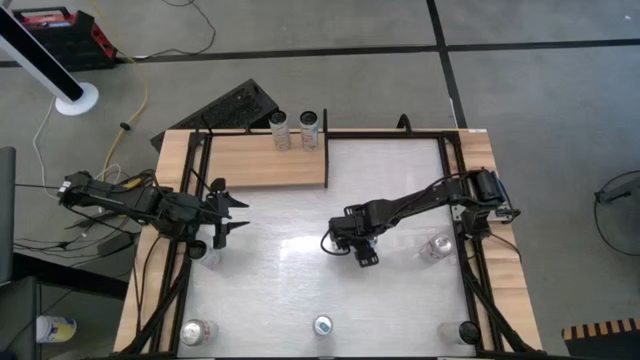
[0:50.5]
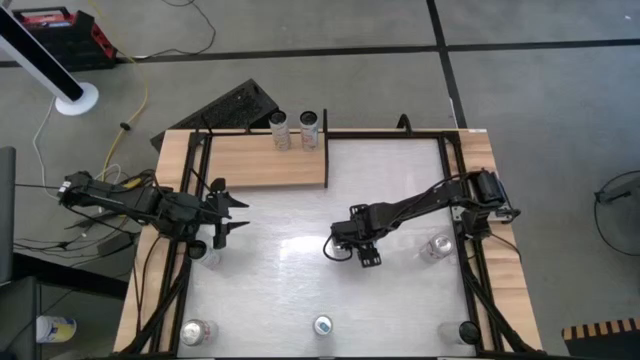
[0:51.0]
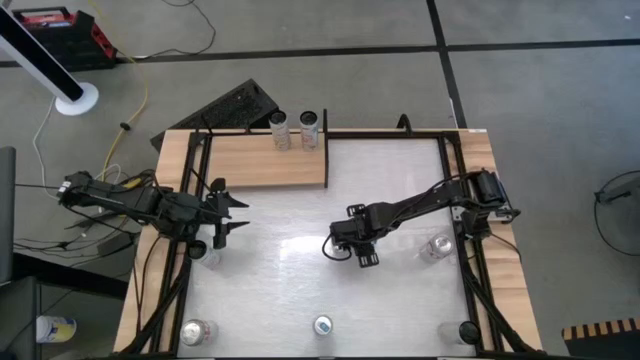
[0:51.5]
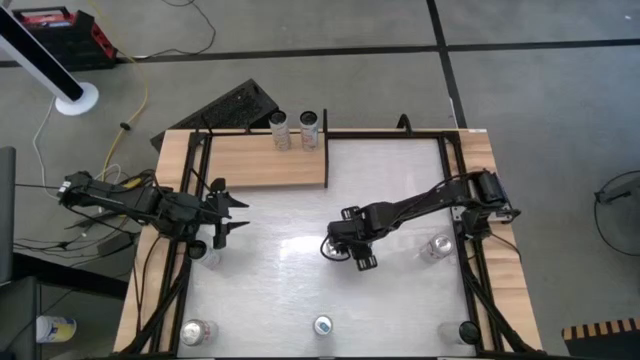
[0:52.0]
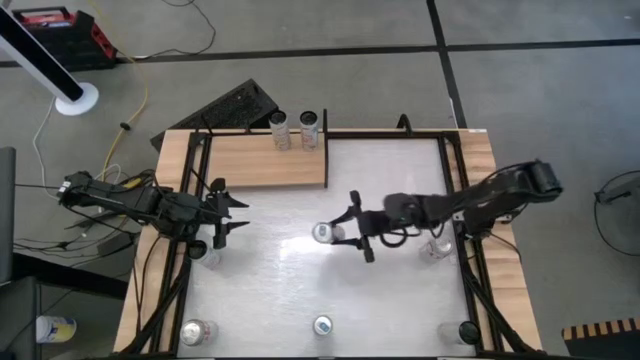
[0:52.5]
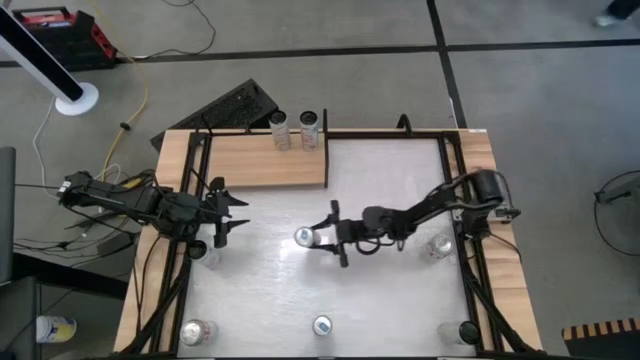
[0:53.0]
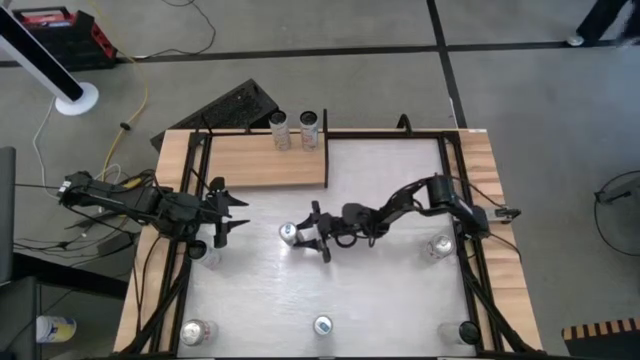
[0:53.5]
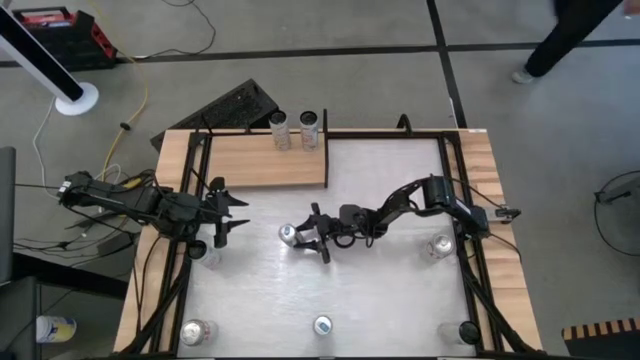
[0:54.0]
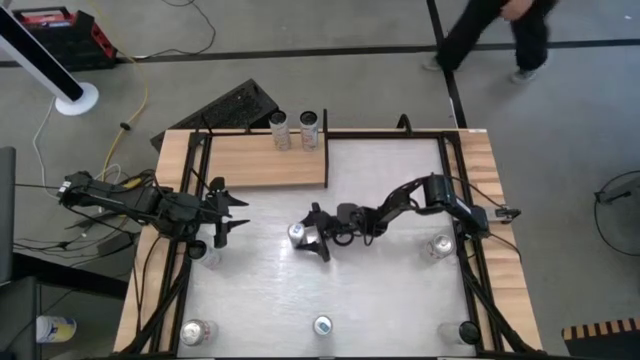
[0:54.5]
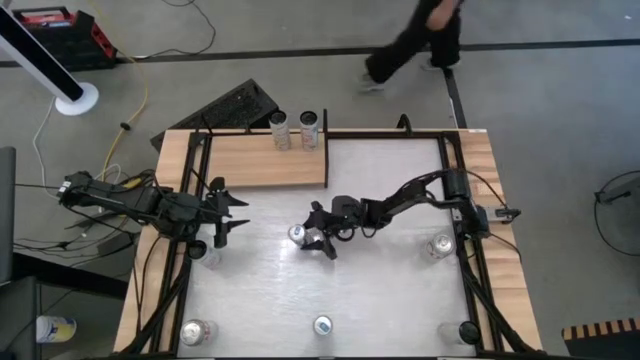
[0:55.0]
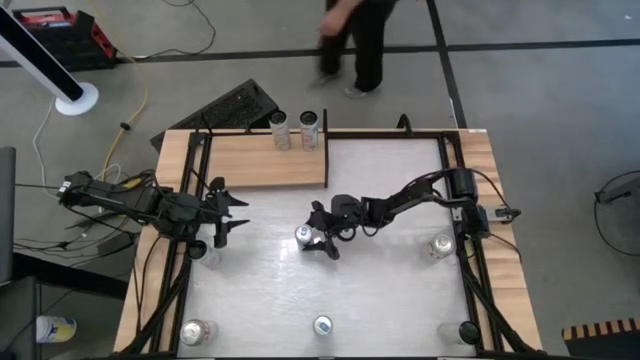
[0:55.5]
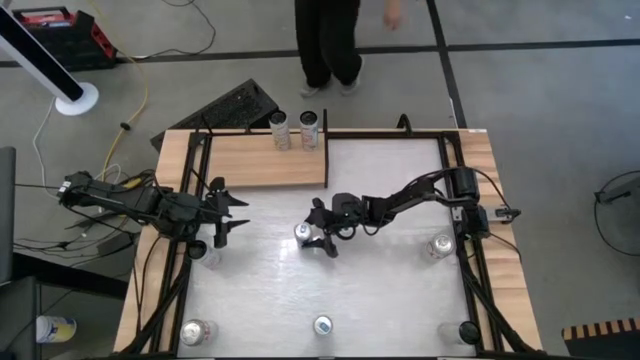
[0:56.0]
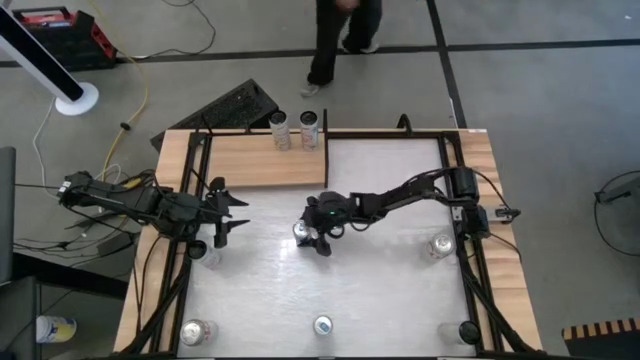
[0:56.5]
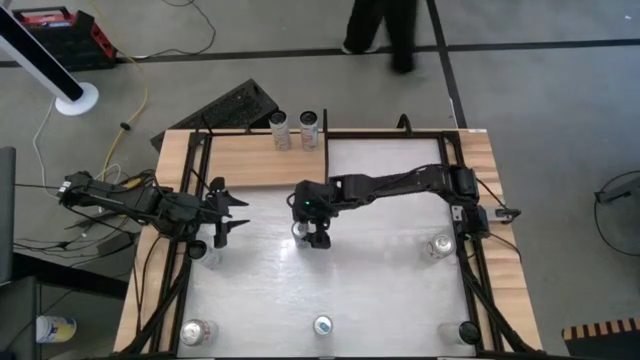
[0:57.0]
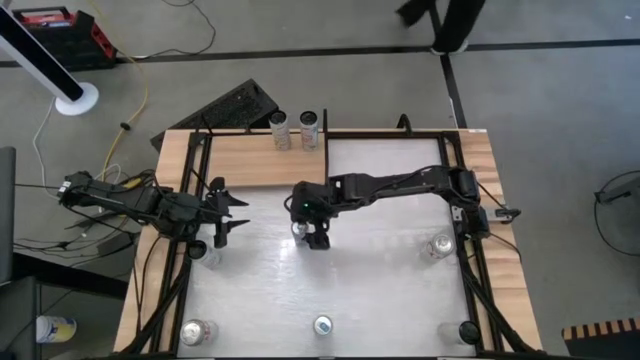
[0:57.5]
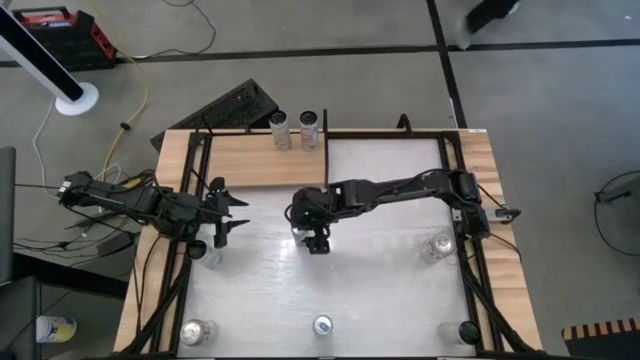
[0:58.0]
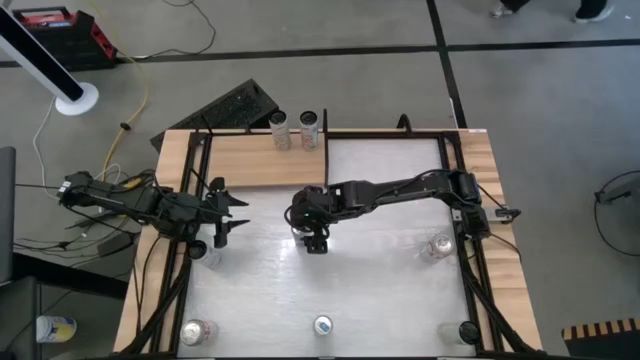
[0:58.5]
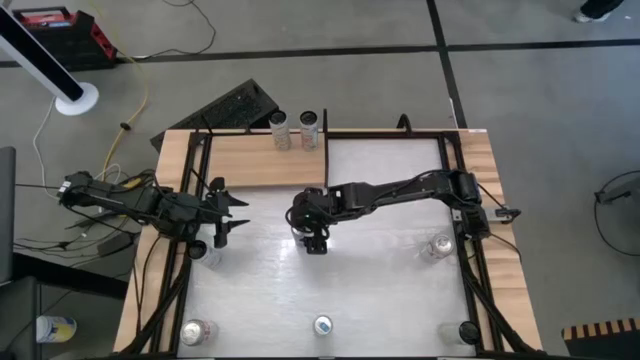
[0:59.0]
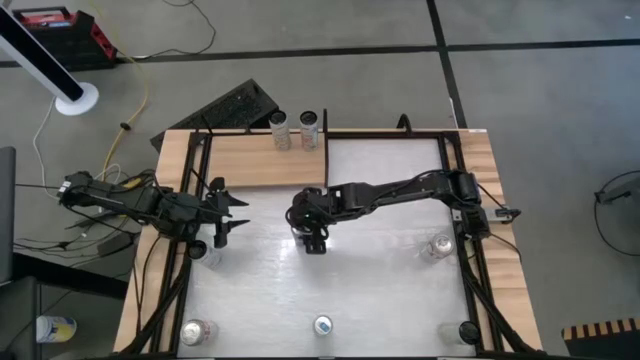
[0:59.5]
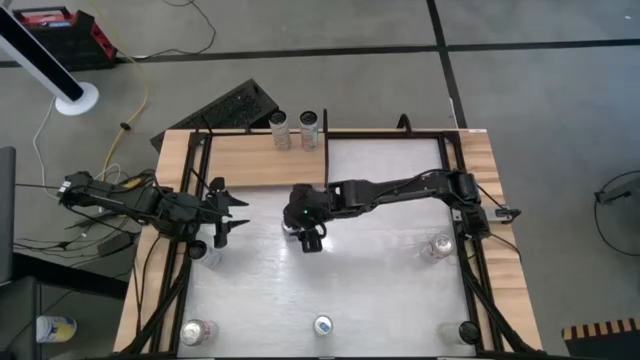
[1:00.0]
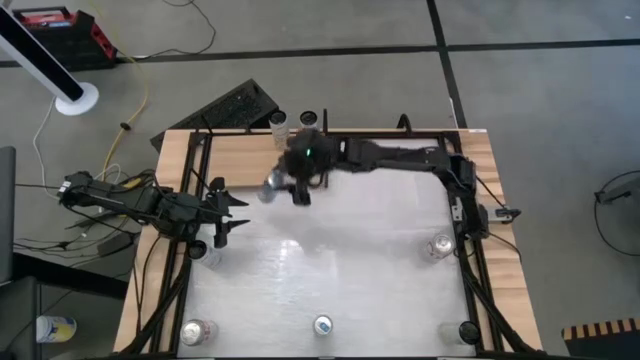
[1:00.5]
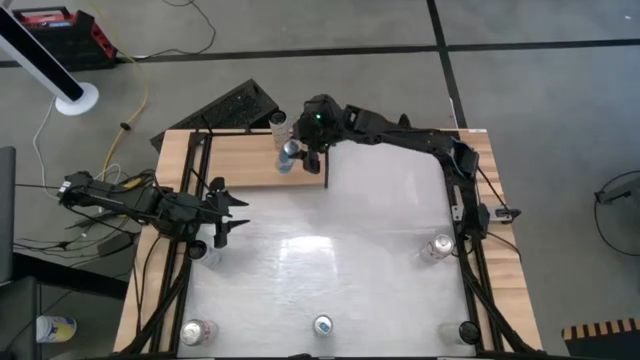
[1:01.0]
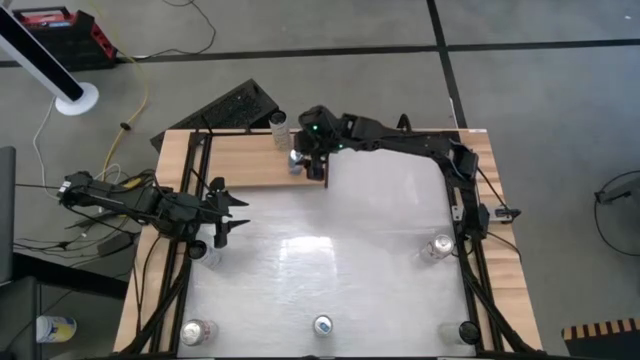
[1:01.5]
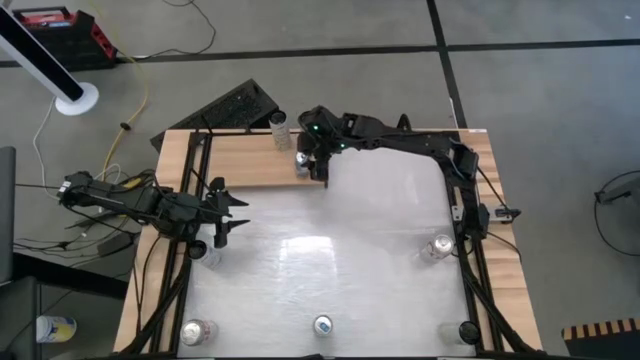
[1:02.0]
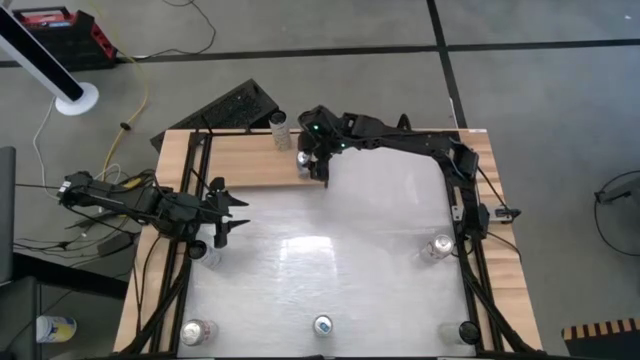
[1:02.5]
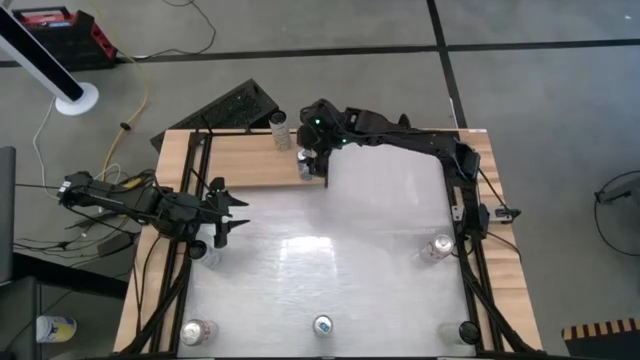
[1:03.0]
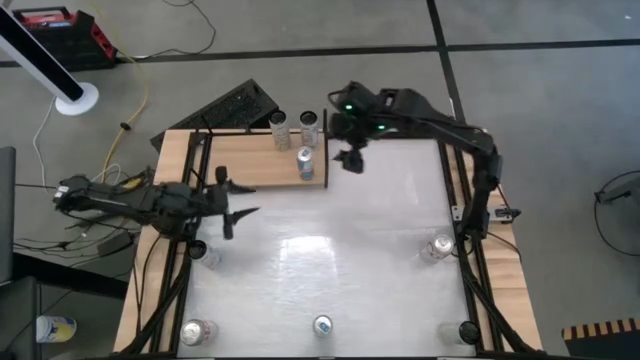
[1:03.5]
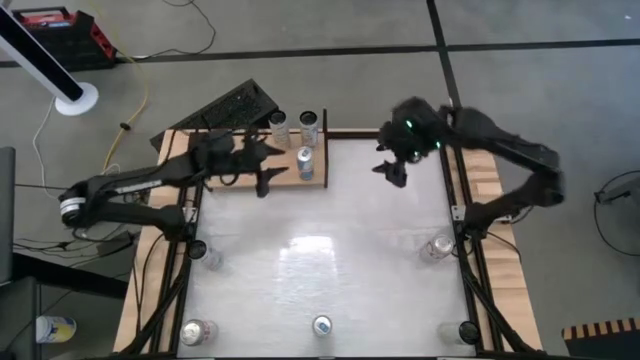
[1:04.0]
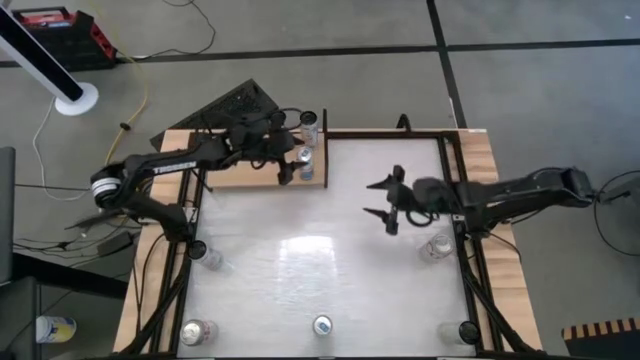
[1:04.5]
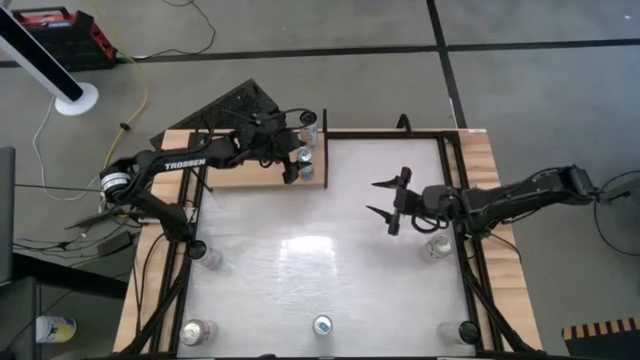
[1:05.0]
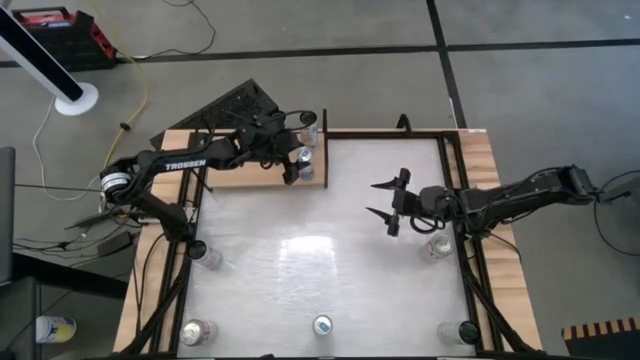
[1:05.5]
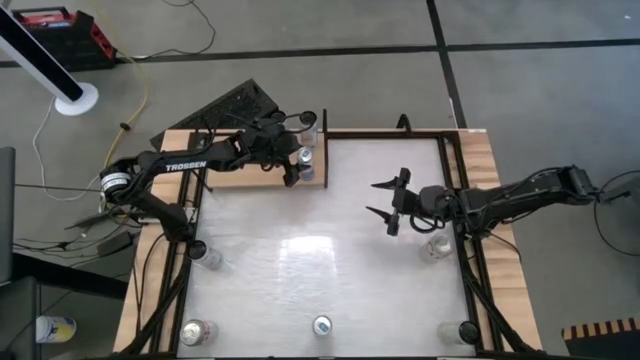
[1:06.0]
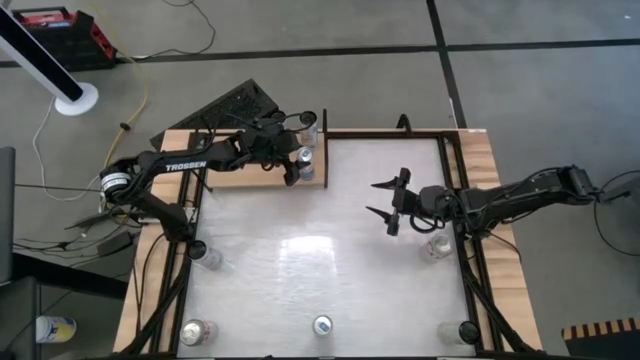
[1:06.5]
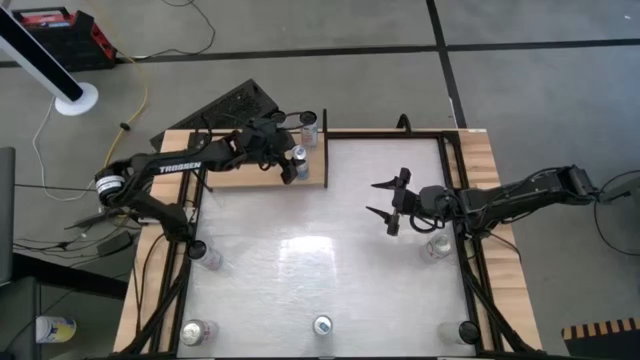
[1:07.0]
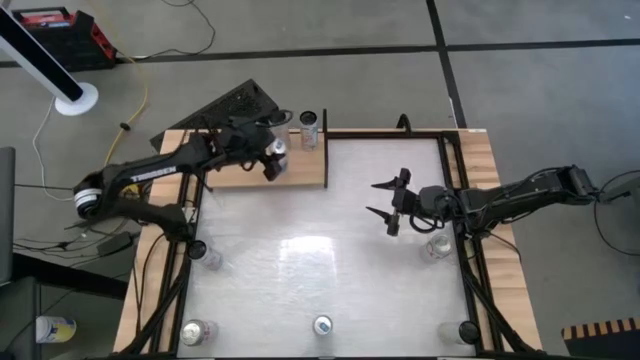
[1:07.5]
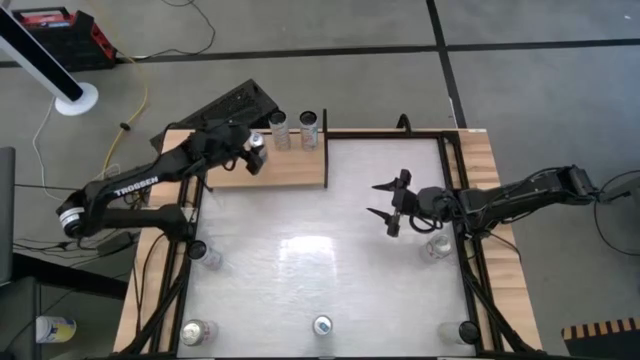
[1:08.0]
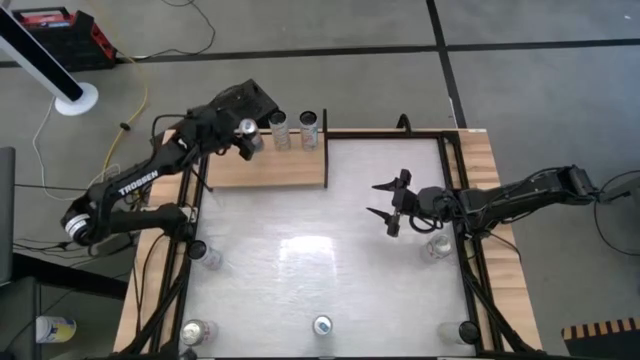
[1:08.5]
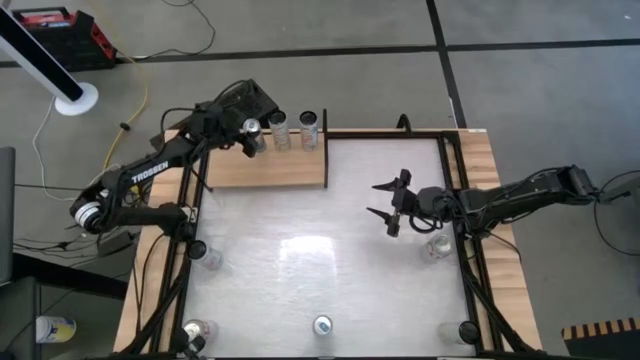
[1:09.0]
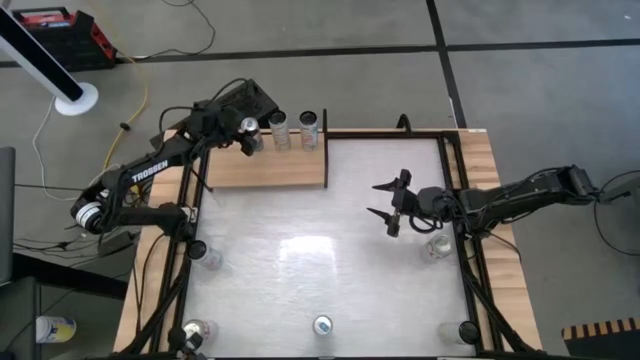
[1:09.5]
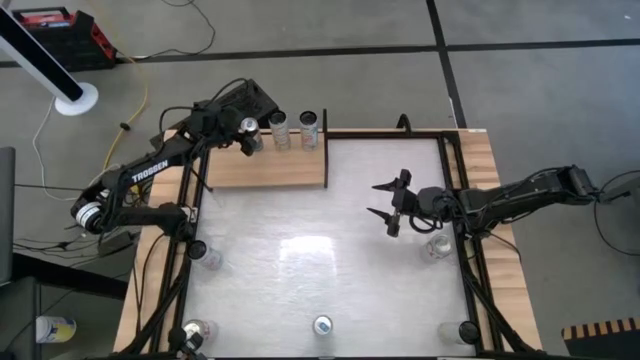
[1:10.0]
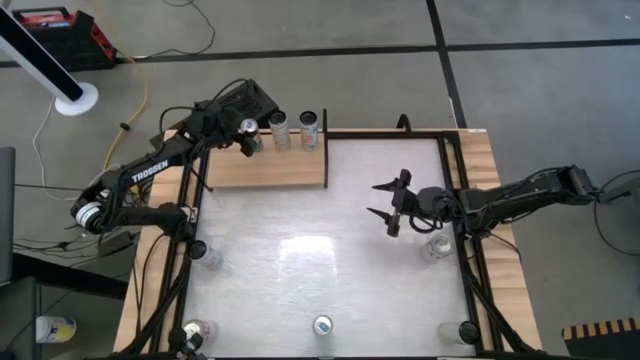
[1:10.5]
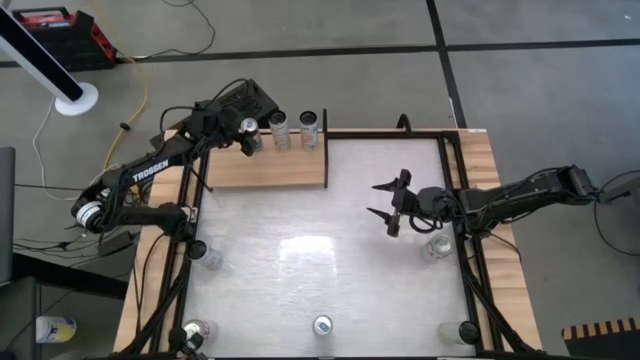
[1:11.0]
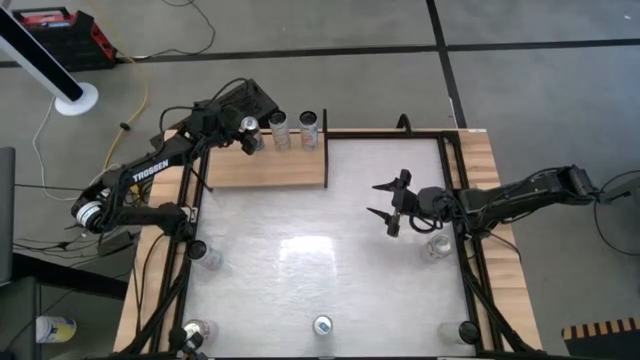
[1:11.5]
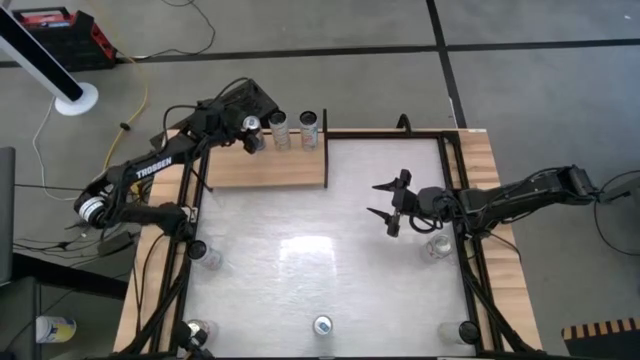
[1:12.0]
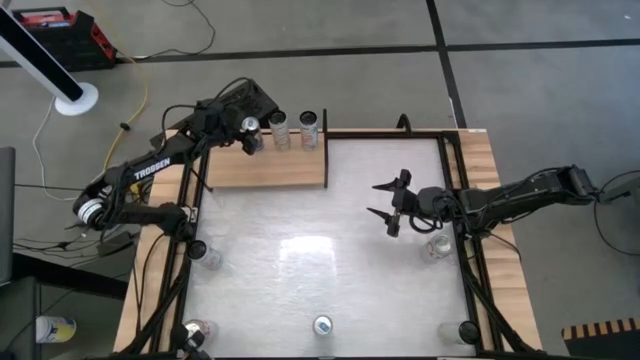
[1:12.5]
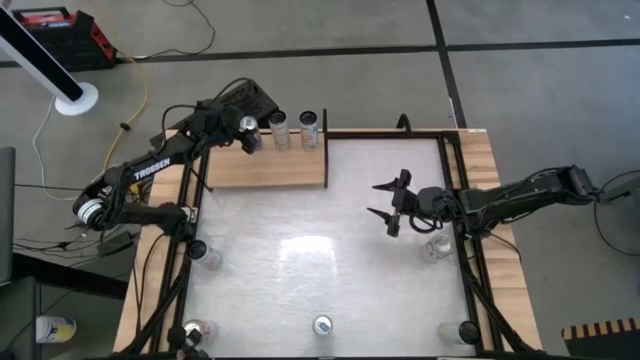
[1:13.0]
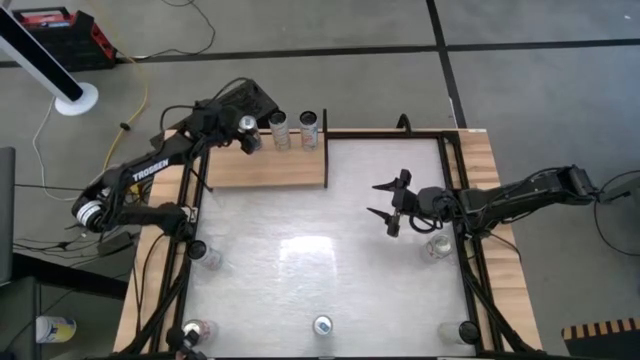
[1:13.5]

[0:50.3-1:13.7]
Task: Place canned beverage on shelf
Put the top red bull soda can beside the tropical vibe soda can on the shelf
